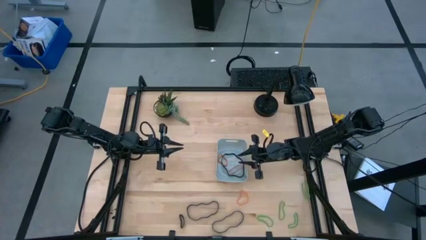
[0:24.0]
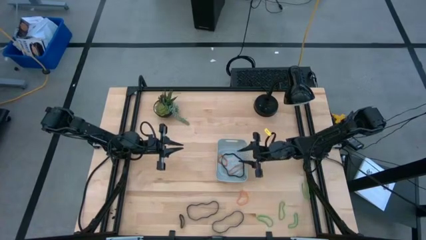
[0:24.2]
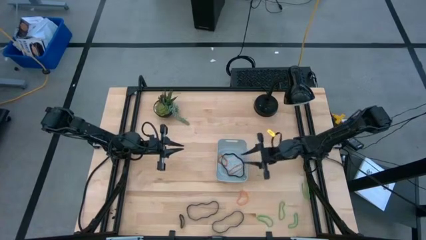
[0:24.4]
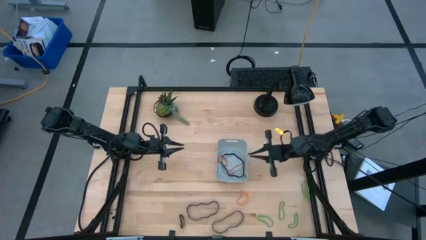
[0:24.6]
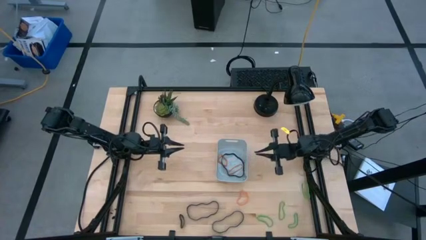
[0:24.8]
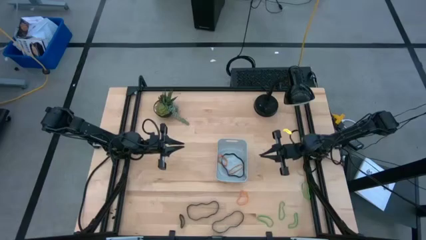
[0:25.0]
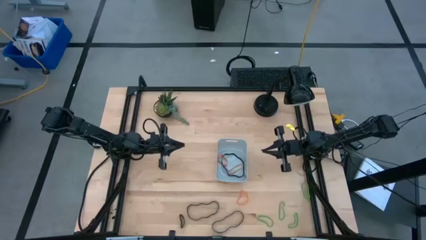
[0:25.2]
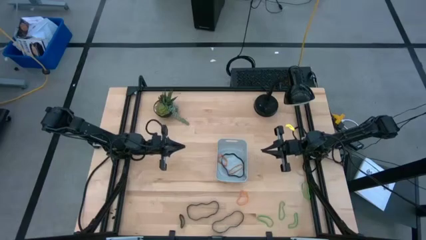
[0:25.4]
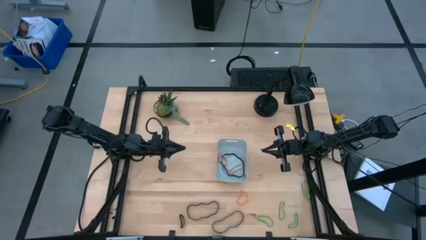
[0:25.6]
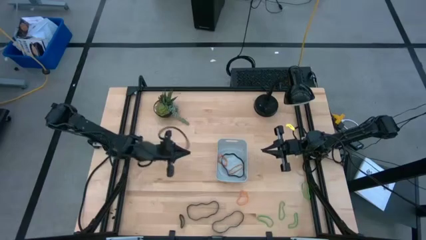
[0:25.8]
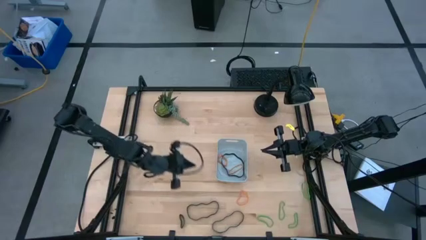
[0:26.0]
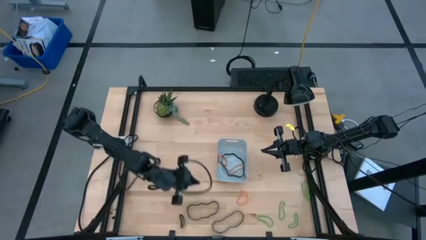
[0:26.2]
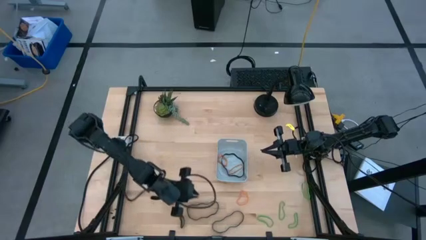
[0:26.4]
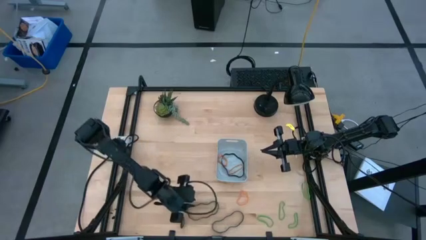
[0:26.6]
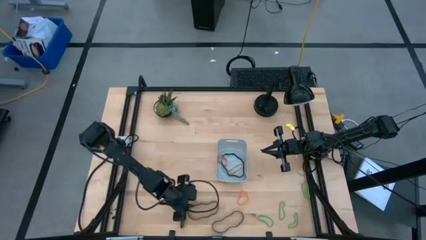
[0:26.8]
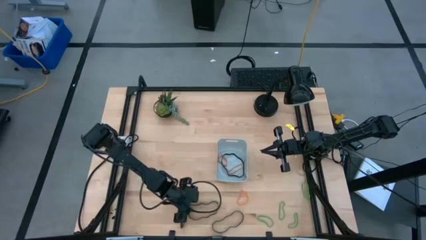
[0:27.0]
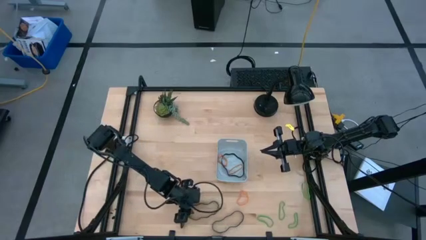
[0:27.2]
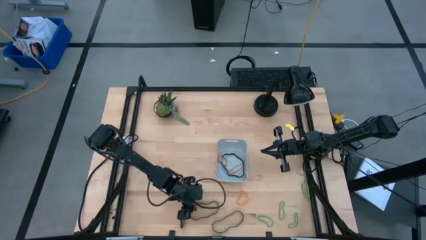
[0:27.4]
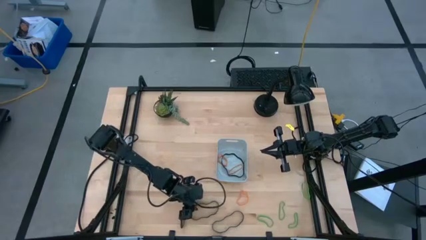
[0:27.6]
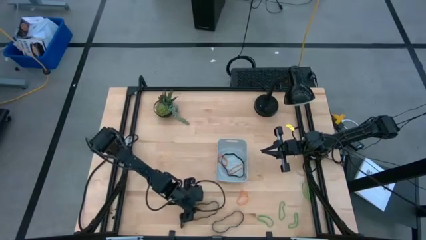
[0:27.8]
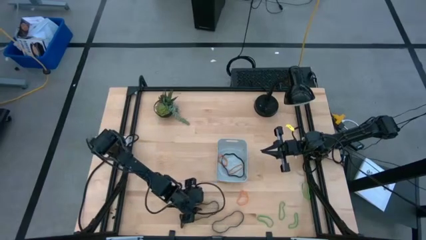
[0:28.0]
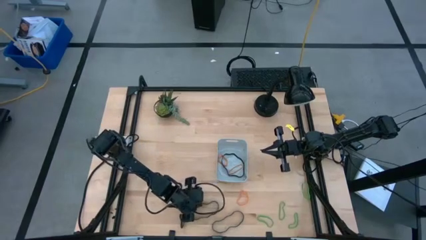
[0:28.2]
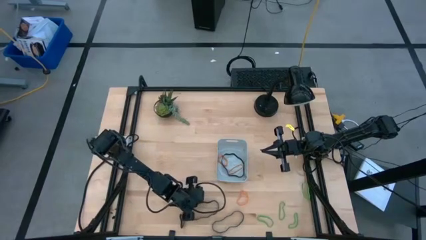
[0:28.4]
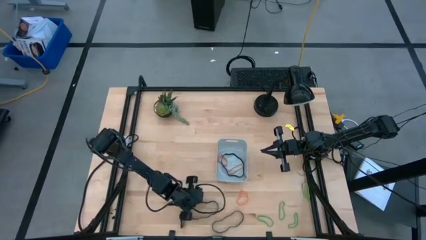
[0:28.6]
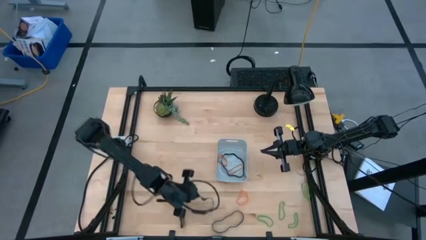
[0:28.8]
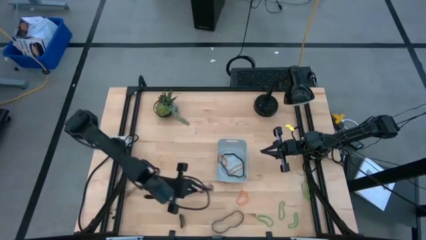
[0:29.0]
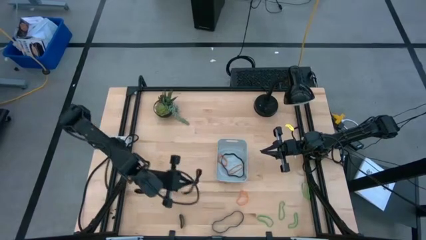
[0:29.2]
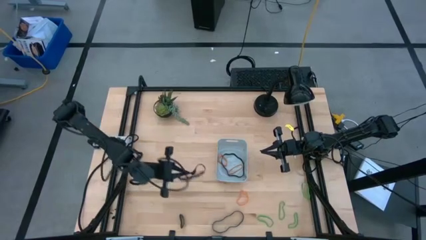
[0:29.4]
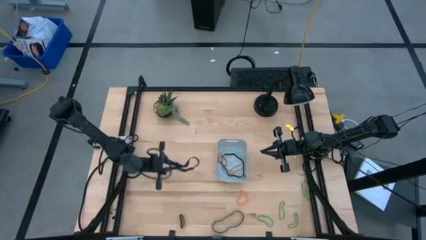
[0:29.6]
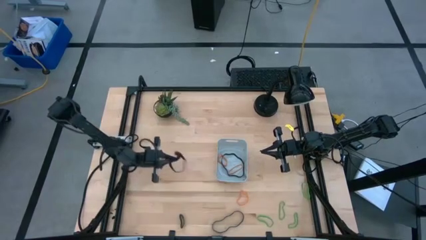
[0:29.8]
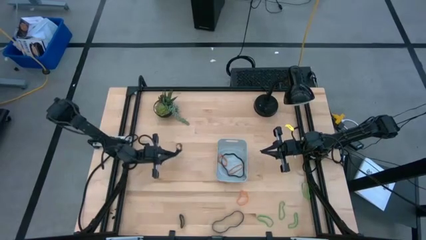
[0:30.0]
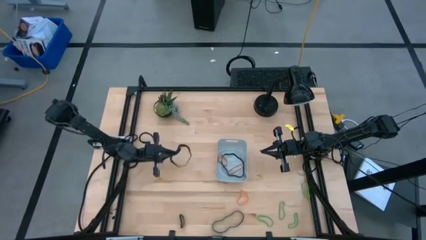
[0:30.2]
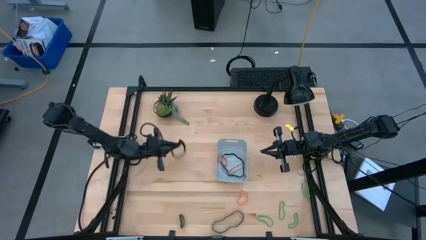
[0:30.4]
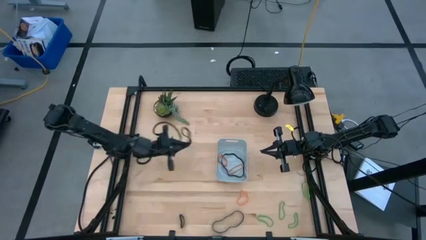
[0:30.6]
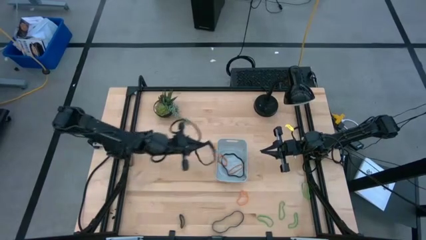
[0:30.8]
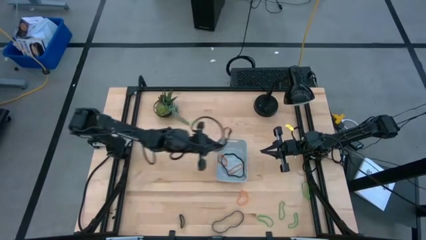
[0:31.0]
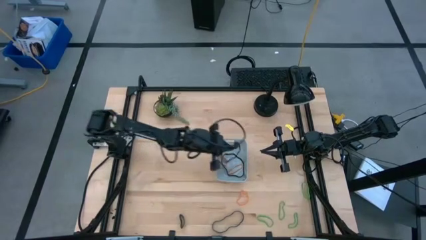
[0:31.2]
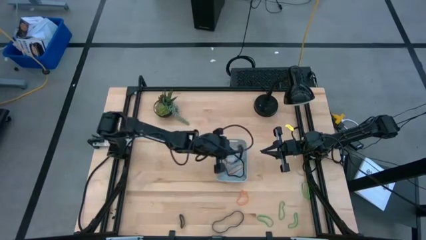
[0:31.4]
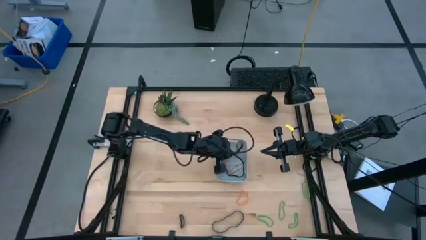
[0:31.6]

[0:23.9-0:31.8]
Task: Pick and place rubber bands into bin
Put the black rubber band into the white bin

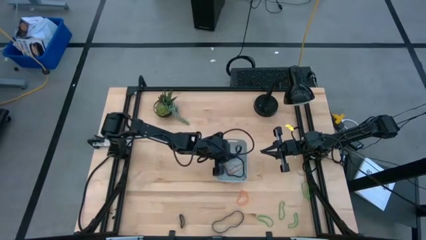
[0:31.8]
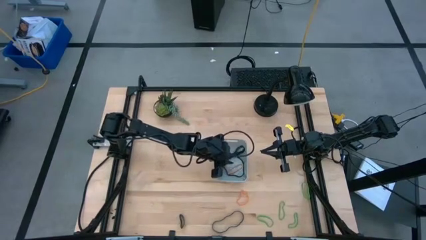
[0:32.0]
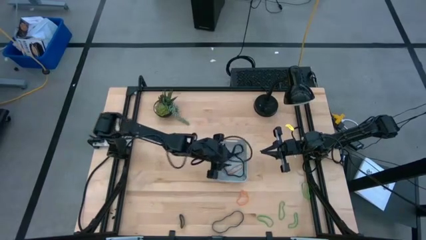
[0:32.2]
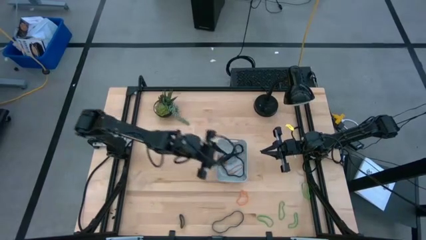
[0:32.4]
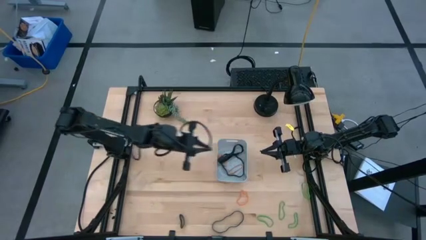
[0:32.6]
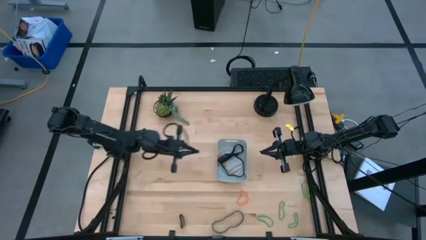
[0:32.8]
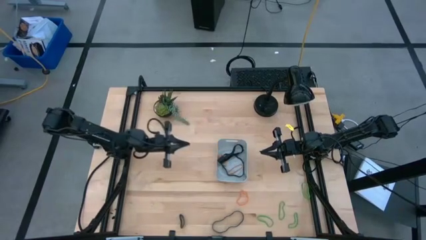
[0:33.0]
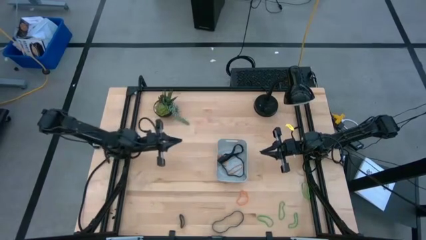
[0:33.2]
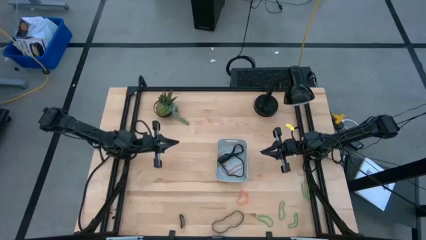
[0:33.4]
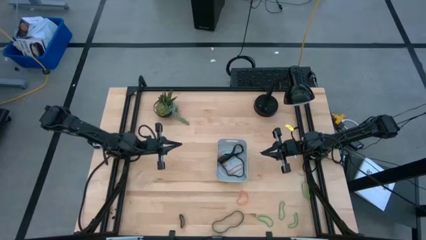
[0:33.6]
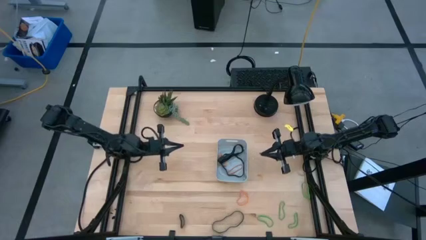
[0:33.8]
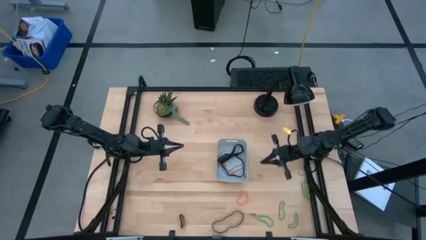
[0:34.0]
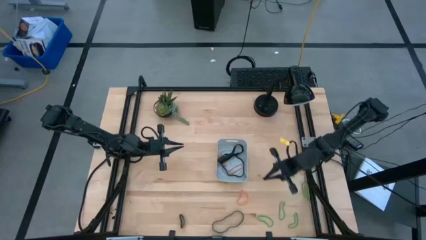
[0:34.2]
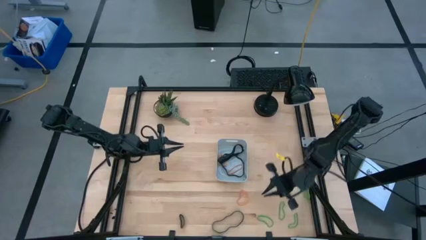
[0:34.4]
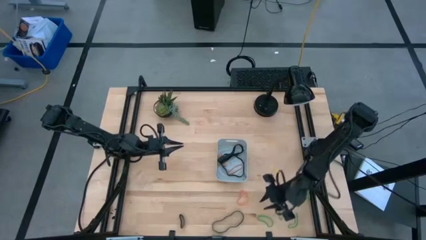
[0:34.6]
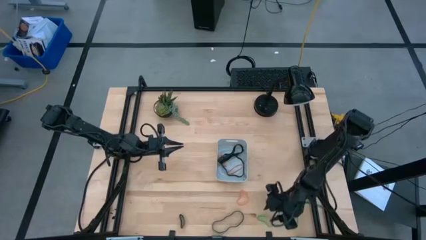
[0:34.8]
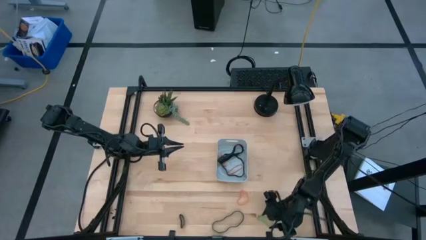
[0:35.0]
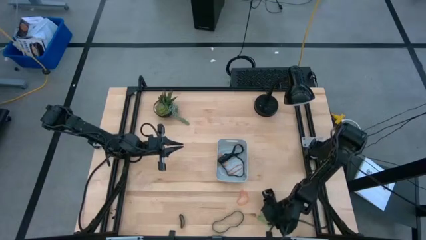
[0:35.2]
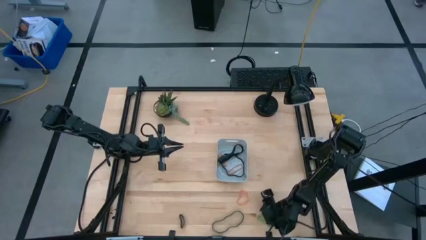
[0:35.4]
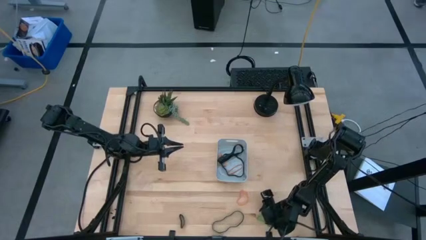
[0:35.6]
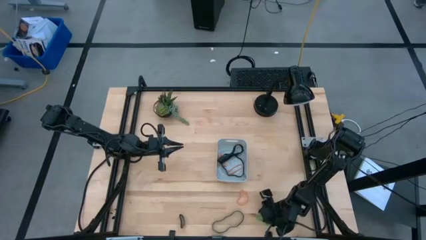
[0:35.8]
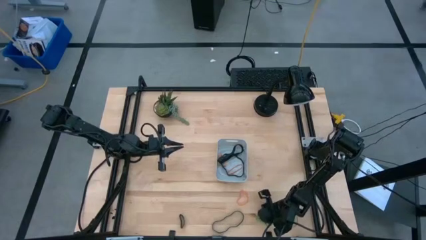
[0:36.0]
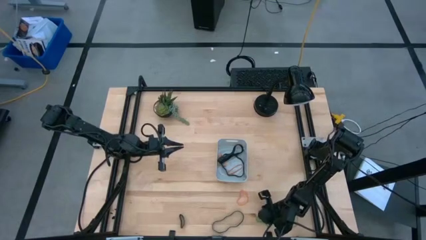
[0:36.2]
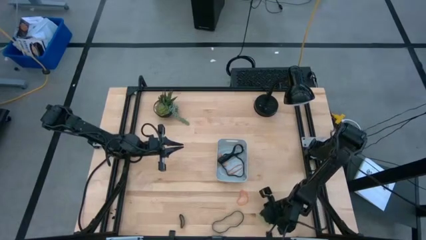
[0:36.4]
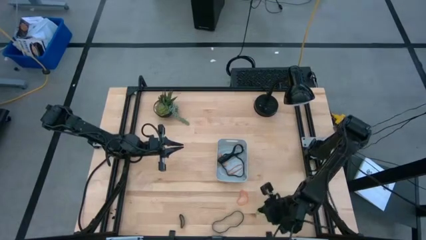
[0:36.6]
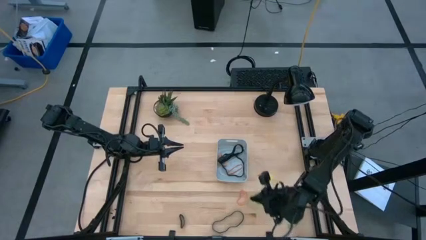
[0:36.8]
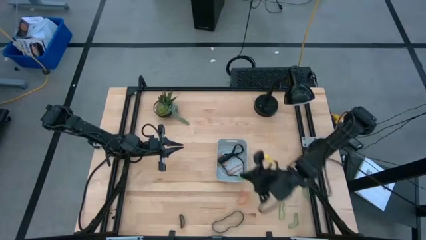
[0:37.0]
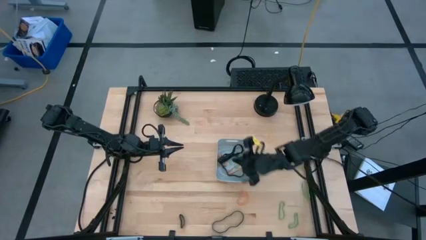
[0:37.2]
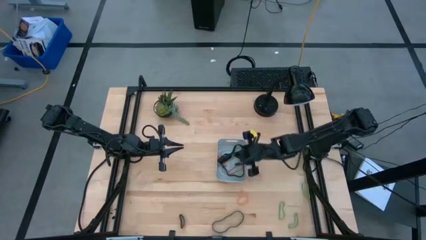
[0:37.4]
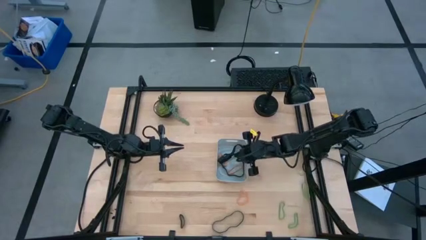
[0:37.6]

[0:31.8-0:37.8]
Put the green rubber band into the white bin

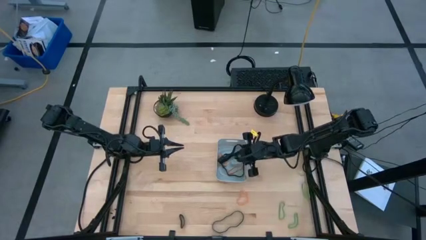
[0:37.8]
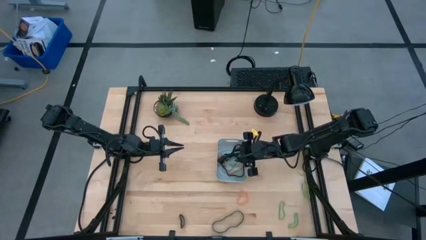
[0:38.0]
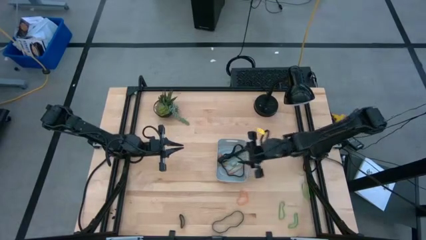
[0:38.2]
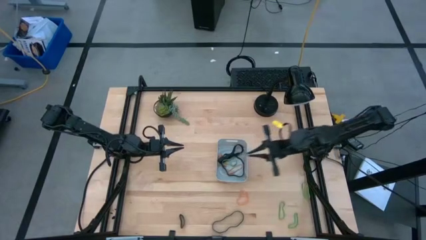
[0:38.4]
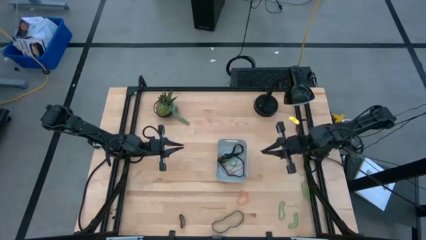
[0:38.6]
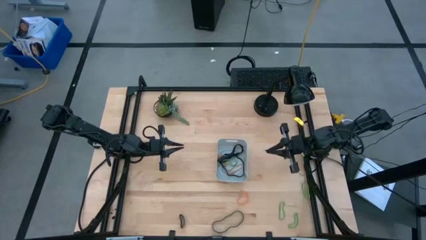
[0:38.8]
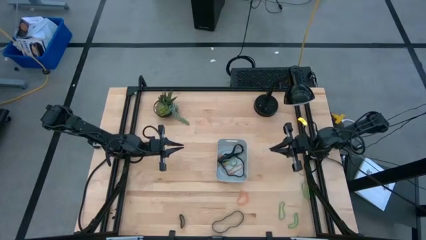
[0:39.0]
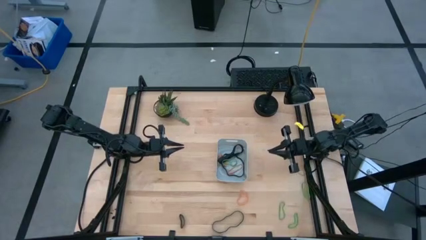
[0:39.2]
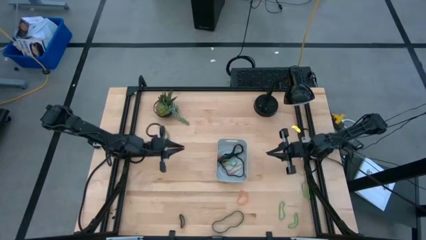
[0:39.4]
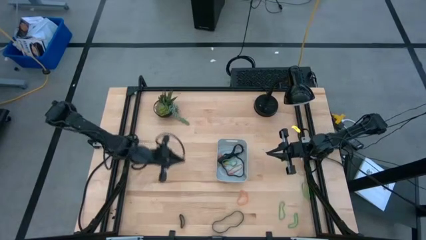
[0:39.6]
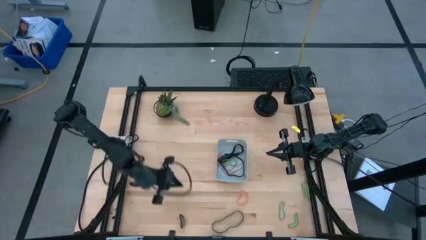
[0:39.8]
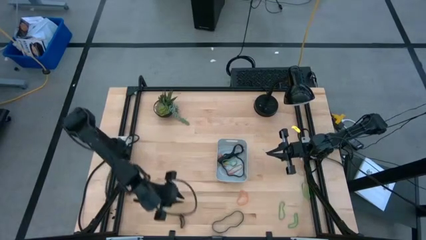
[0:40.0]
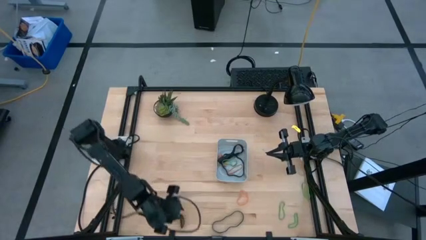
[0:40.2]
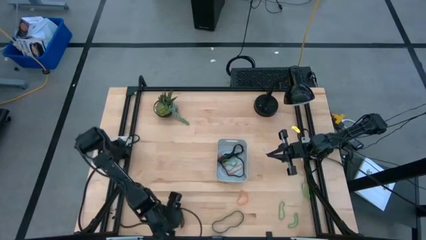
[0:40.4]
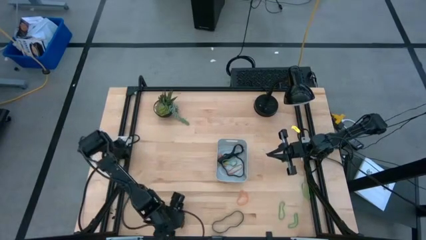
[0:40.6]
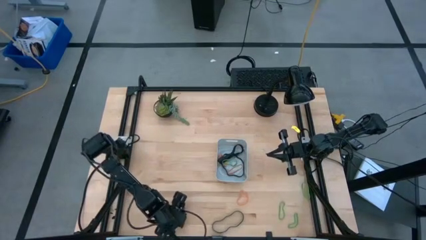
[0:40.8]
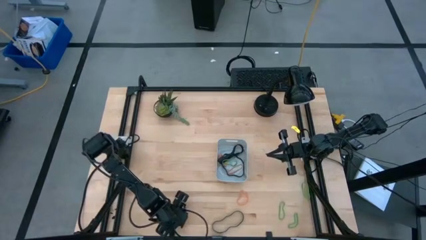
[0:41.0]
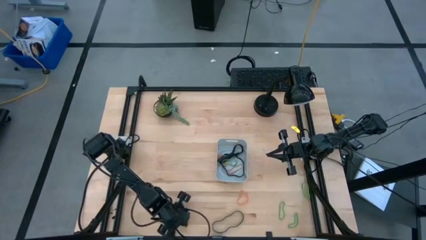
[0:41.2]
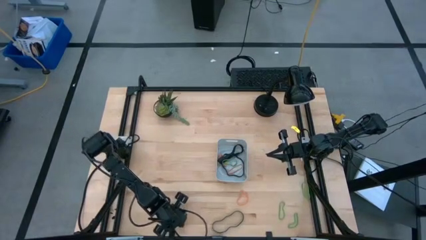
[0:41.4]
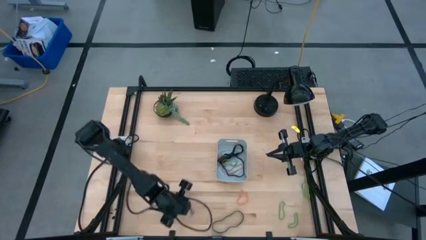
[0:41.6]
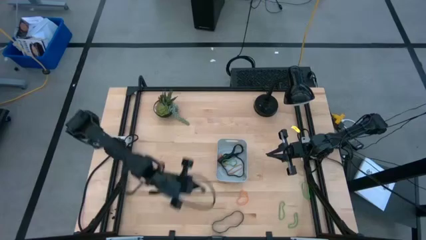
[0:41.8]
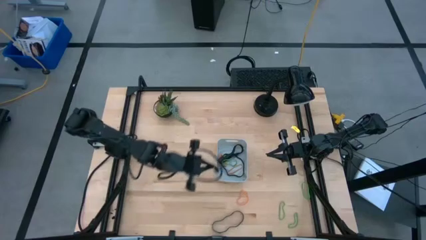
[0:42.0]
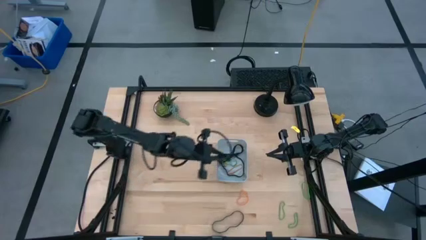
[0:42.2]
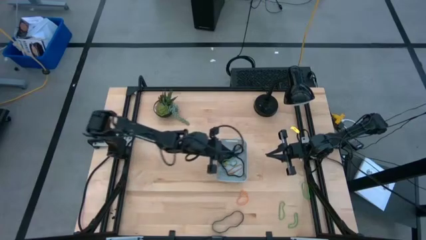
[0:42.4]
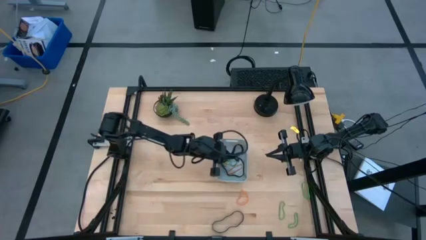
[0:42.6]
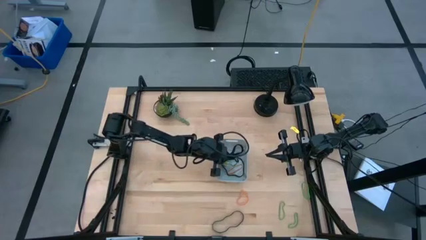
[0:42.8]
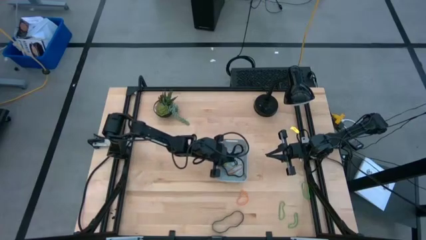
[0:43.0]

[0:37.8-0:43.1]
Put the black rubber band into the white bin
